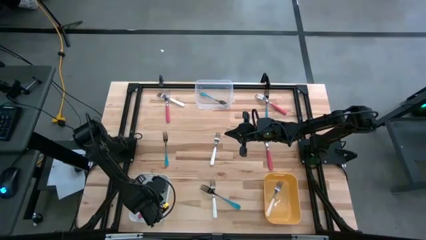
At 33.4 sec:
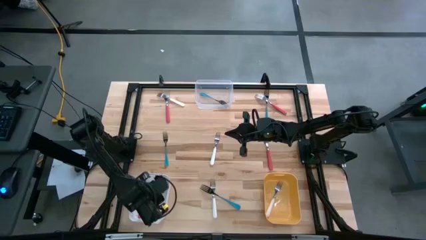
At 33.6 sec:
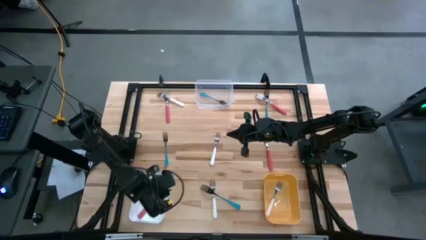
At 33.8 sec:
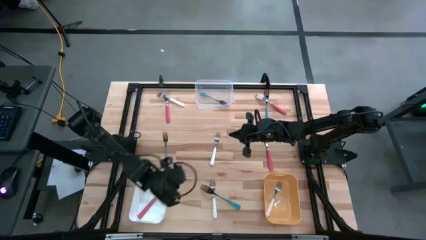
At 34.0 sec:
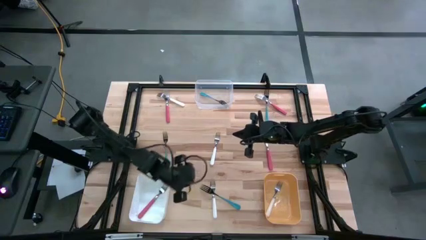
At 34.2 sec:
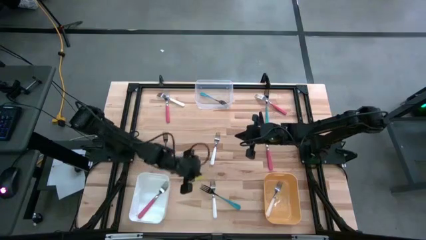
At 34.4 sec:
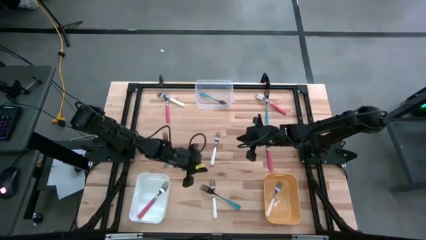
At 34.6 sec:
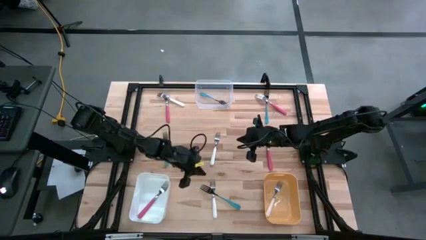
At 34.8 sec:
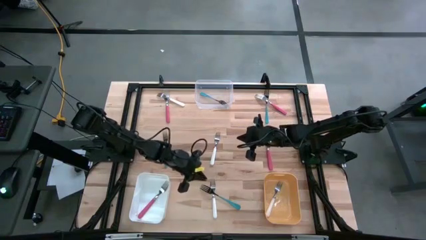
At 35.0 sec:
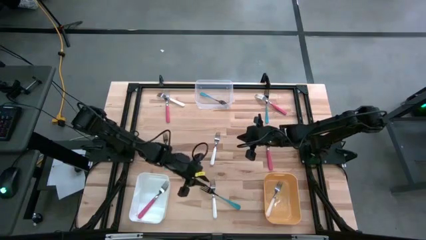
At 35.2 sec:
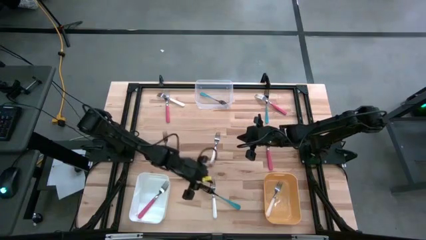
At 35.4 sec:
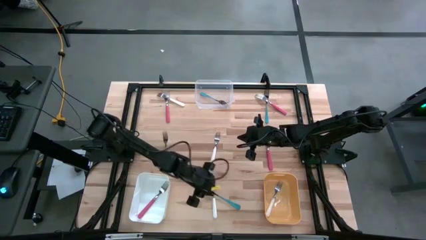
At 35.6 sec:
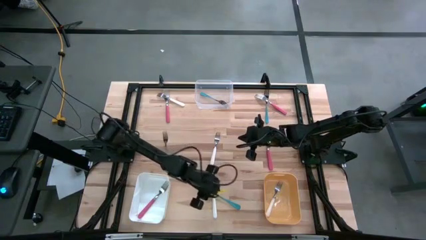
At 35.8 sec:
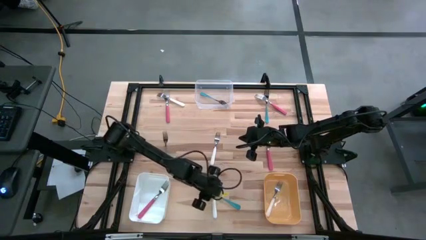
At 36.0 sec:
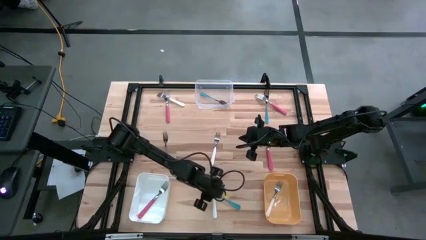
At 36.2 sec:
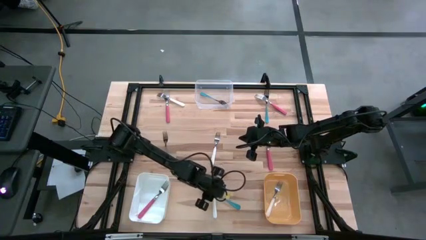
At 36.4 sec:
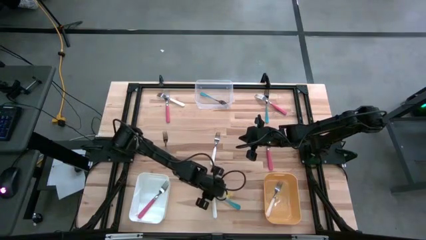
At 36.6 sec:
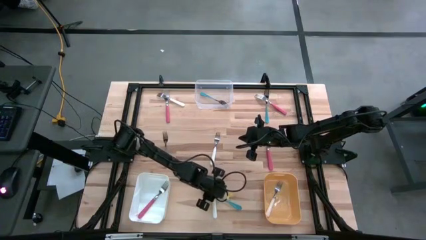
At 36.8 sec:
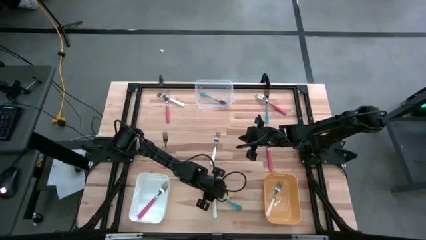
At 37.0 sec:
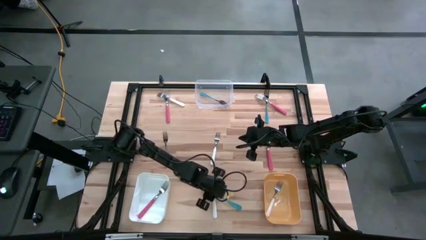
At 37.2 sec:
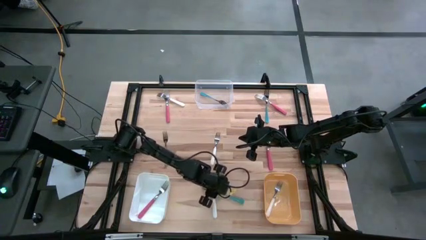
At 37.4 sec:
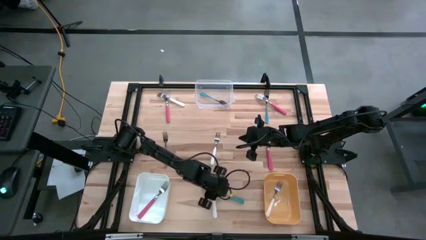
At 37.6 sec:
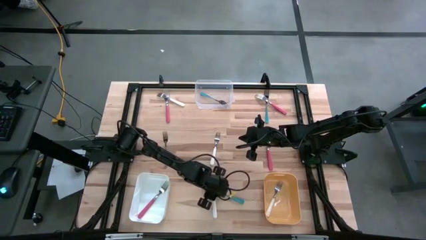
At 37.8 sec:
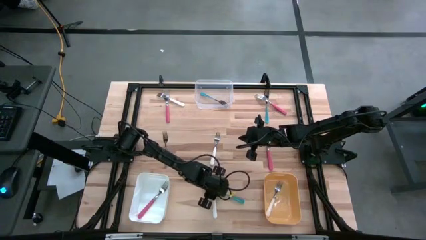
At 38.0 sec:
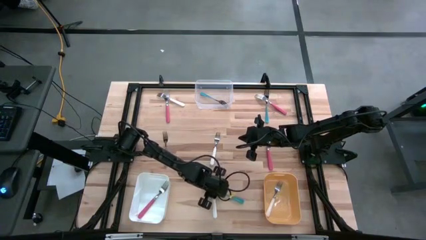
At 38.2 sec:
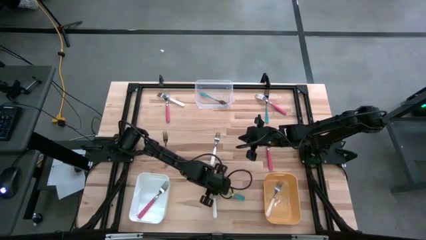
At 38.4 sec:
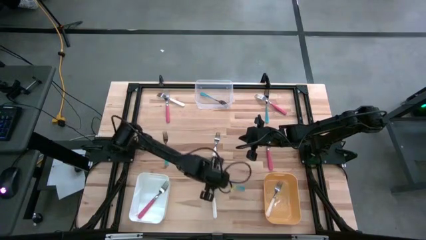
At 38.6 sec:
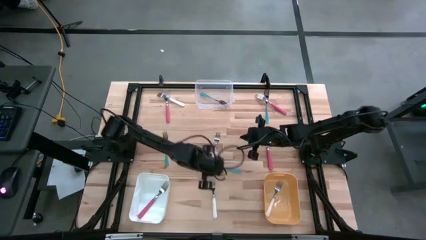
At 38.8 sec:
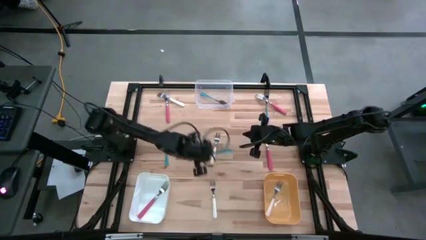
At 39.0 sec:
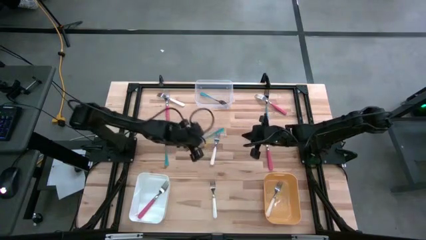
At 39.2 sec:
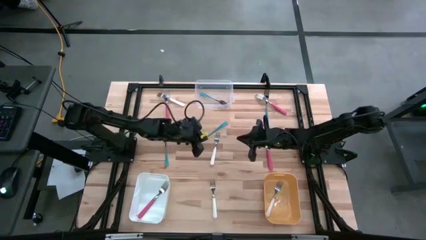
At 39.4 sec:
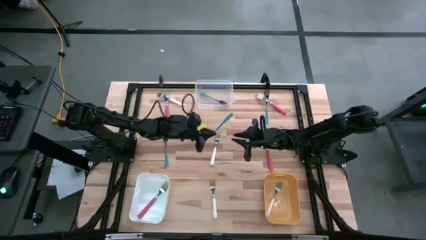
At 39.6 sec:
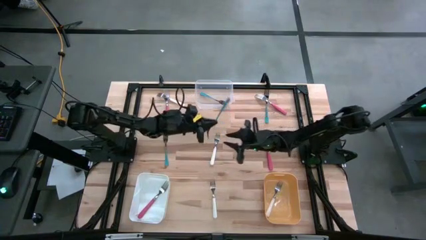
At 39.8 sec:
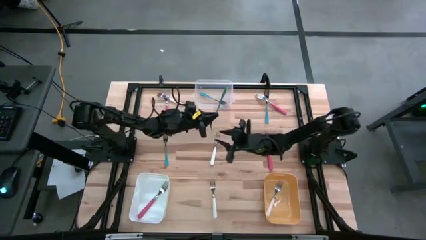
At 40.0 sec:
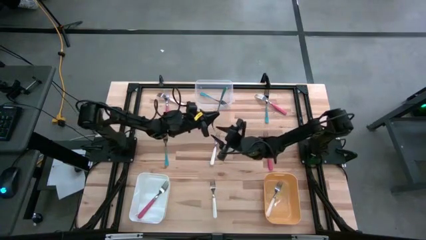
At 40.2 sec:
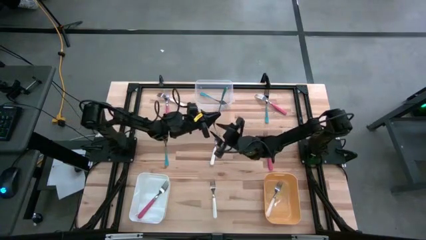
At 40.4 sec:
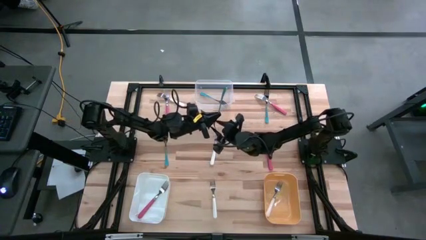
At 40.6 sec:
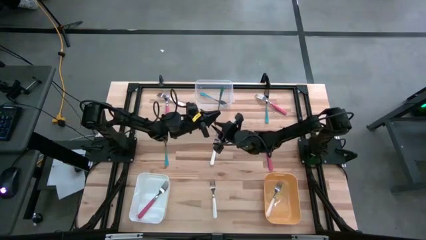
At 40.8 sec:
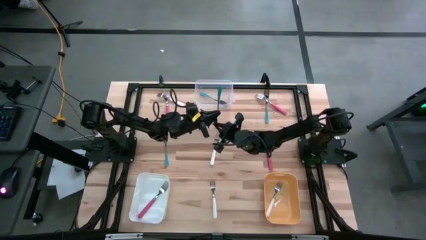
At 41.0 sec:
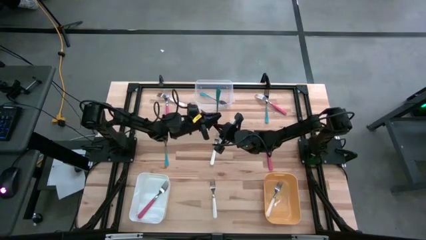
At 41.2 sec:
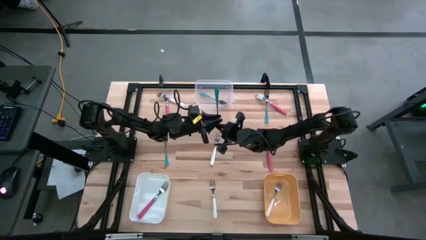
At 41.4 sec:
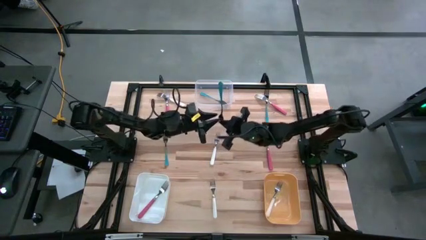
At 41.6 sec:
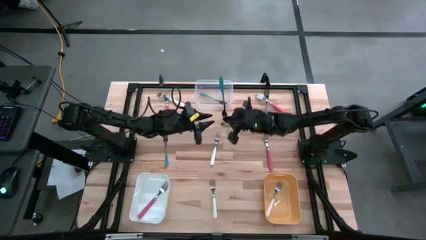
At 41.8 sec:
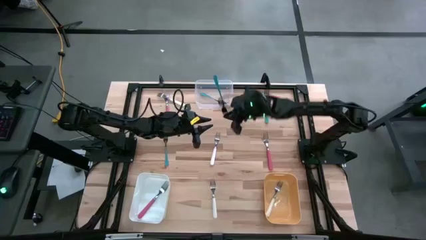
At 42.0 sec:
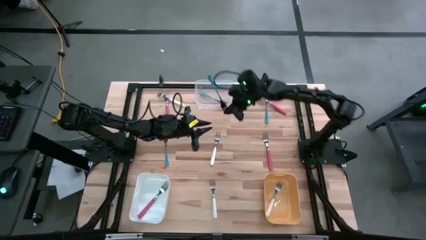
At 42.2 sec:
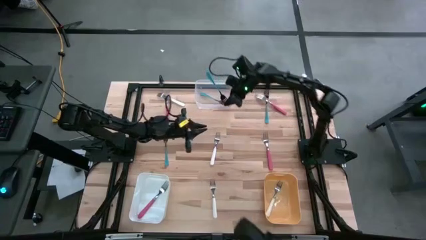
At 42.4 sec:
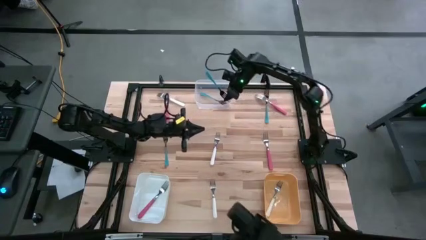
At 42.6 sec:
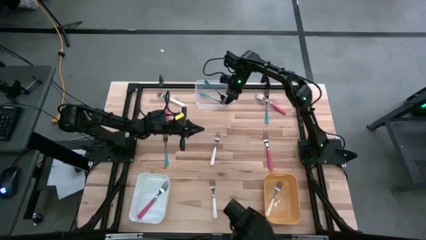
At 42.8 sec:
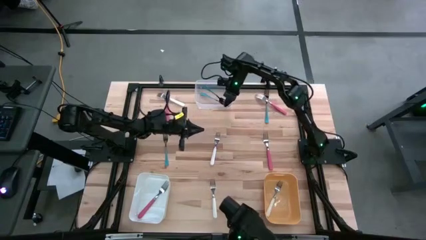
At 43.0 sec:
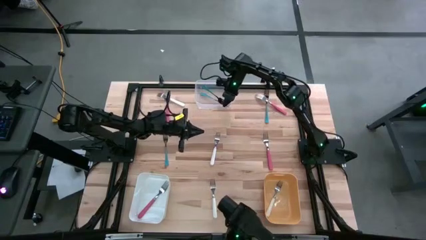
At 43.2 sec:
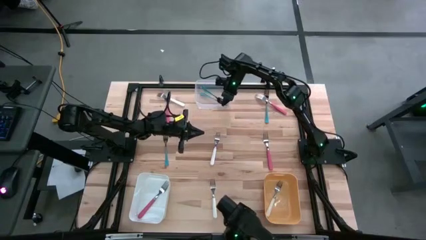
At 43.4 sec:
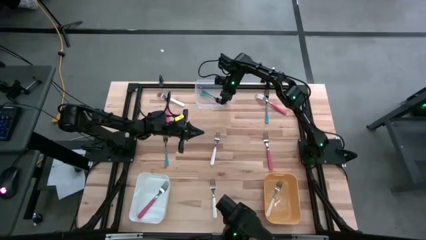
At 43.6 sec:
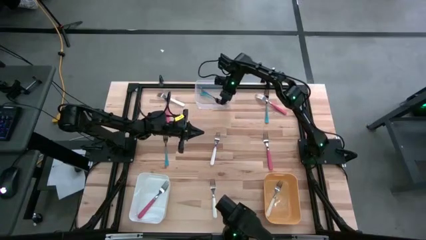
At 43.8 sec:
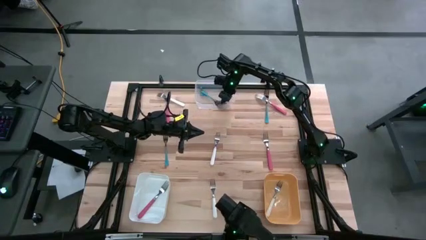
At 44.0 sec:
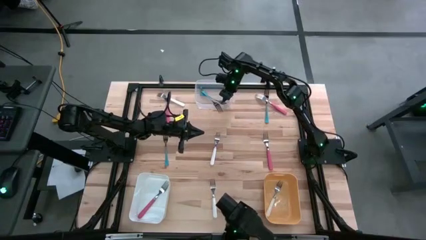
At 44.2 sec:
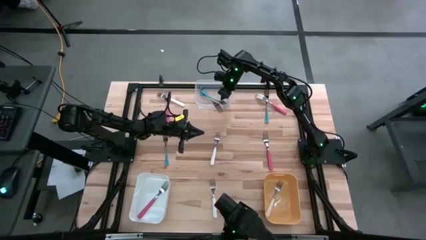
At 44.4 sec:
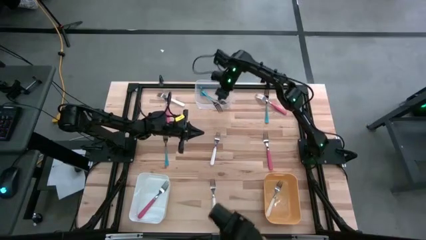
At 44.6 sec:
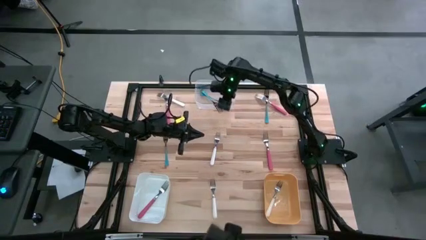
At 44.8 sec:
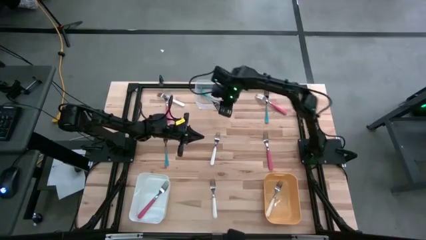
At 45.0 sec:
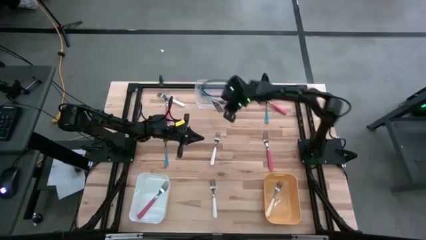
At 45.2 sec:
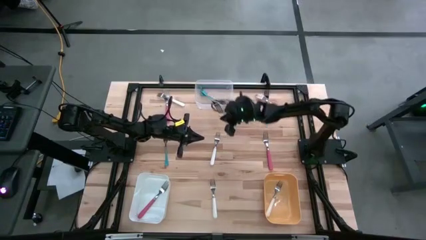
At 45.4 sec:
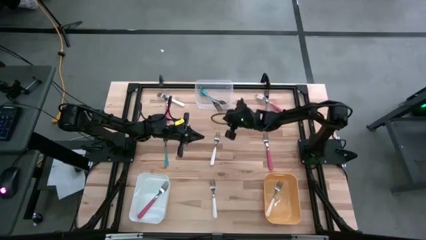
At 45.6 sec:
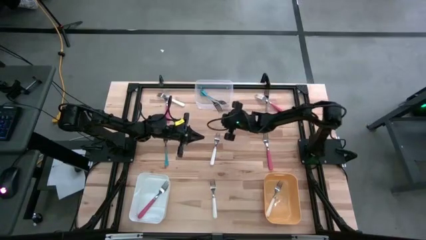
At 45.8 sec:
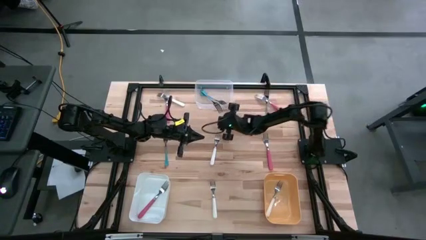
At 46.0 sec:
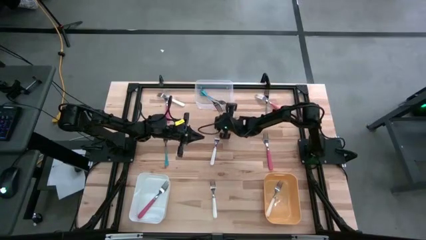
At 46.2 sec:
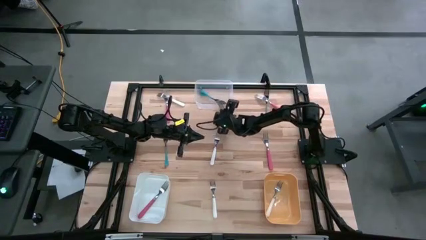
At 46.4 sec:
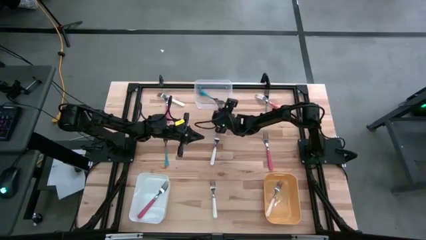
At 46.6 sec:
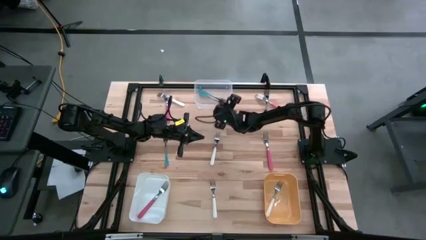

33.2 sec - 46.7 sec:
Task: Sort silverware by color (type)
Put the blue fork into the transparent bin

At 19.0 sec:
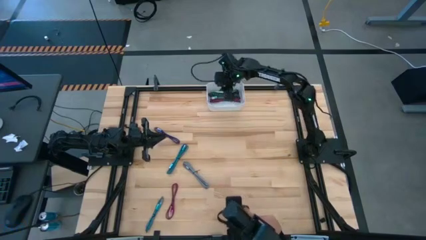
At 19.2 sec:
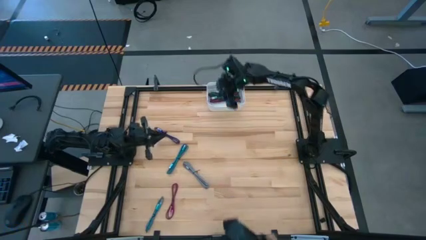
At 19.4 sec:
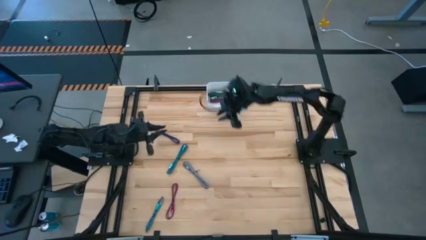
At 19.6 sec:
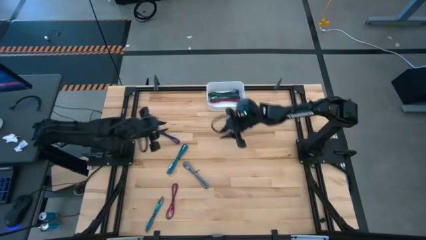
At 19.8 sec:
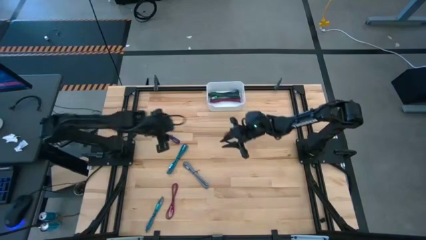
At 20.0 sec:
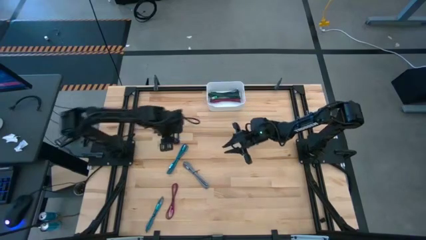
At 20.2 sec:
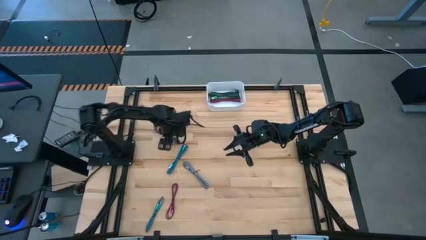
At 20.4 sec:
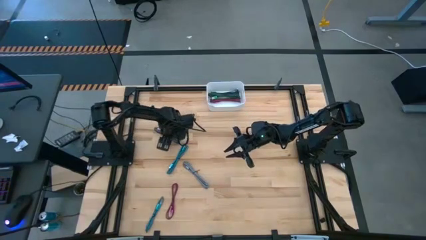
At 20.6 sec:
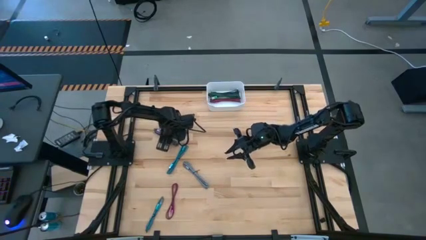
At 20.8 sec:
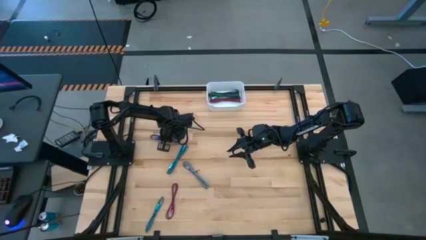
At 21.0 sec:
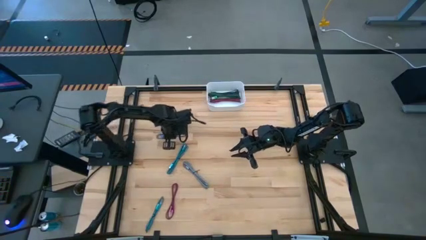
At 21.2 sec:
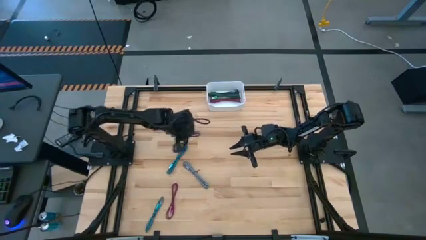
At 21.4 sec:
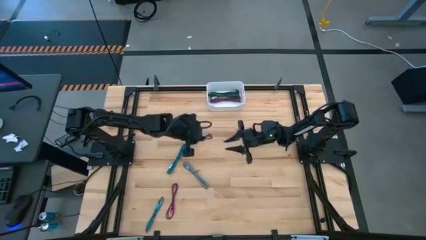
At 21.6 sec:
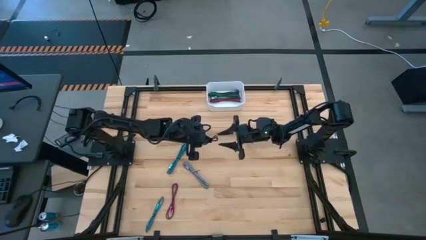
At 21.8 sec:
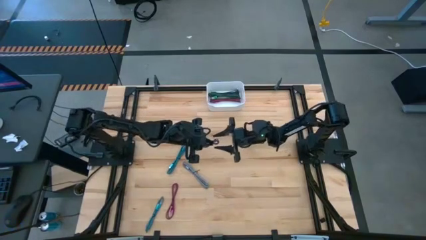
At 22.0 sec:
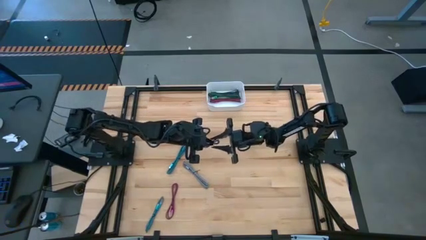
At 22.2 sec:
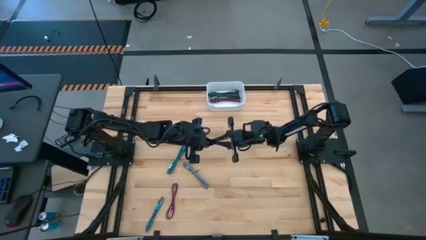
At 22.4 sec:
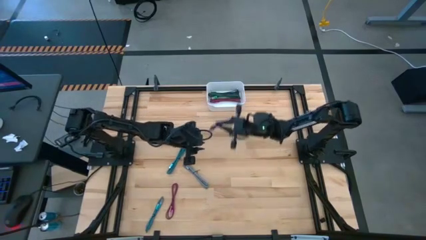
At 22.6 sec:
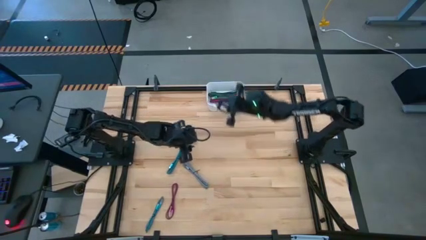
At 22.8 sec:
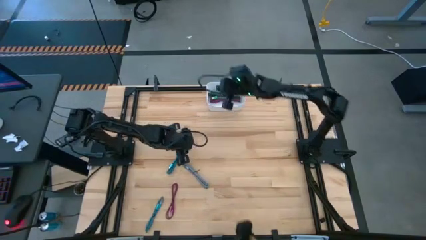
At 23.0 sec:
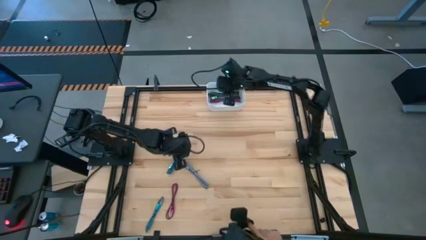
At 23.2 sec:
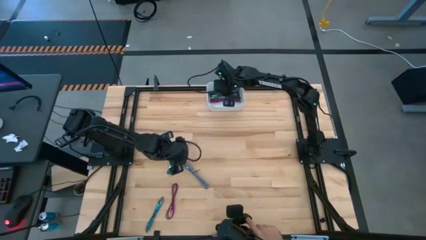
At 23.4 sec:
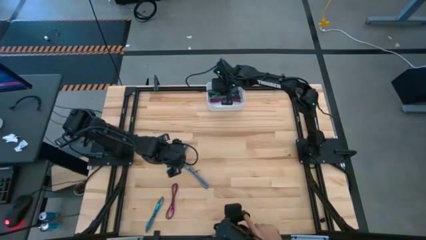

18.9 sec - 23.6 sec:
Task: Pick and place USB-C Cables
Put the violet charger cable into the white bin
